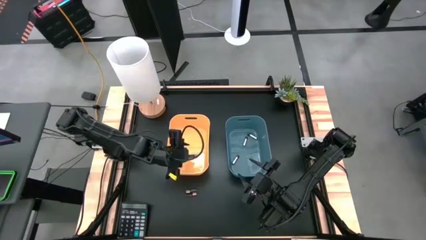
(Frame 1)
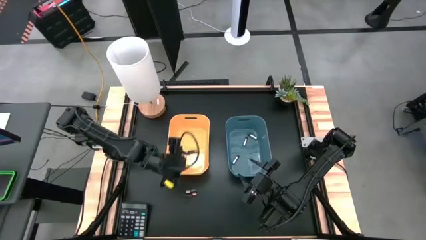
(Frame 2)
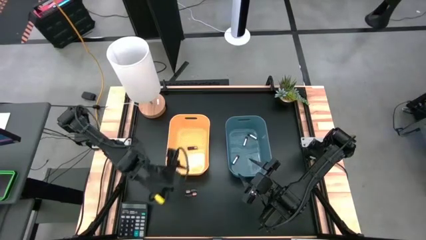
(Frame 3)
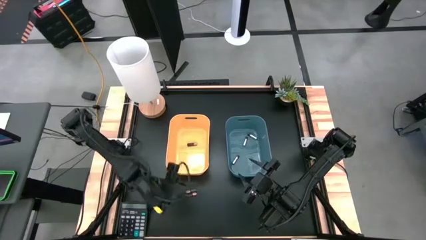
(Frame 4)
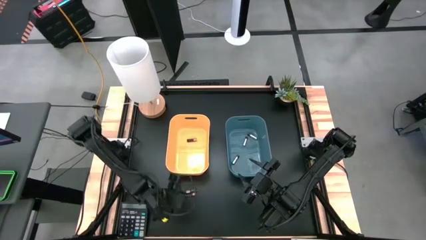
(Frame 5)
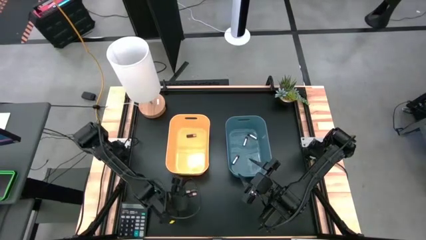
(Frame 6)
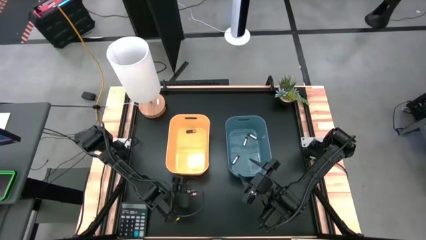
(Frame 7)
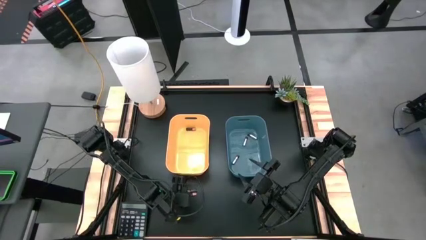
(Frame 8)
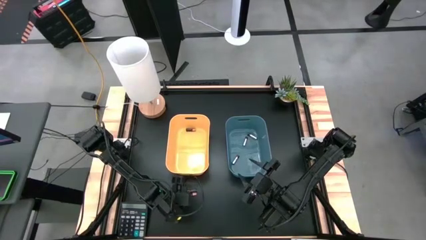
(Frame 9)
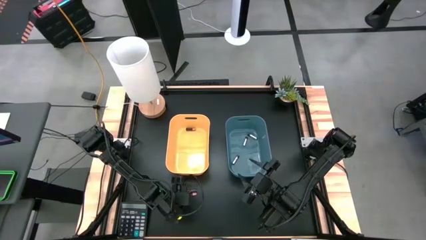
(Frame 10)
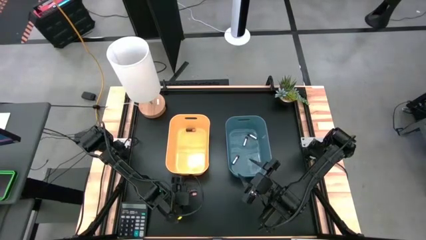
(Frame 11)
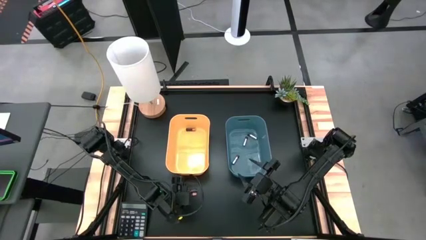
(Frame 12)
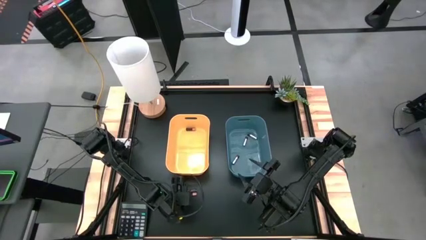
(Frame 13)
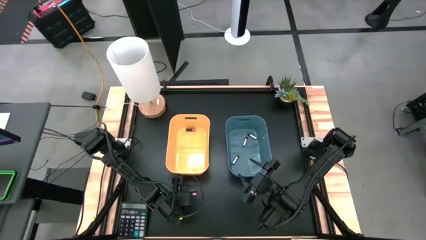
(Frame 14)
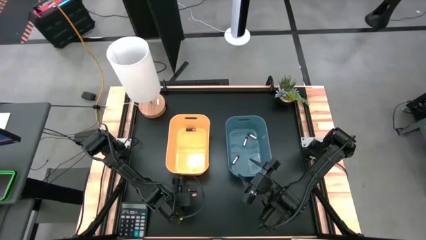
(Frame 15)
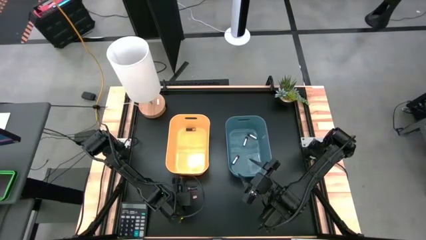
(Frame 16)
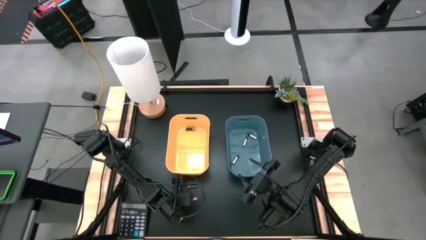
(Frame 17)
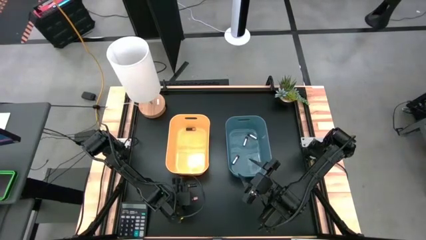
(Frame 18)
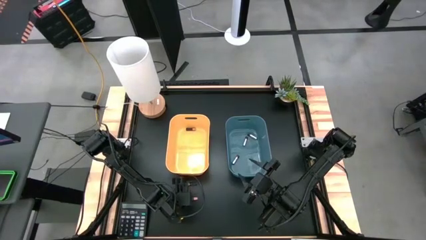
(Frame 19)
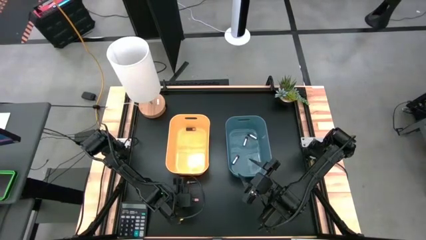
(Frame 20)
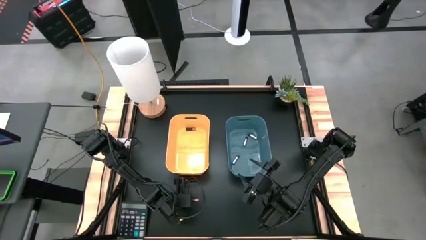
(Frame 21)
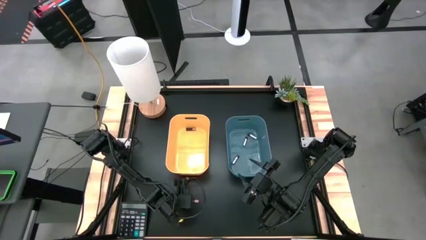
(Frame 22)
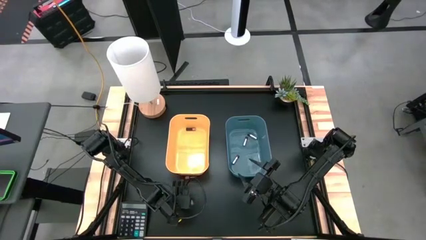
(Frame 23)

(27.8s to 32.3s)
Task: Sort batteries
Put the bottom black battery into the orange bin

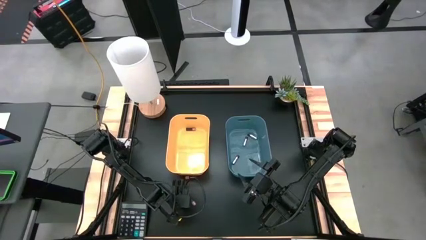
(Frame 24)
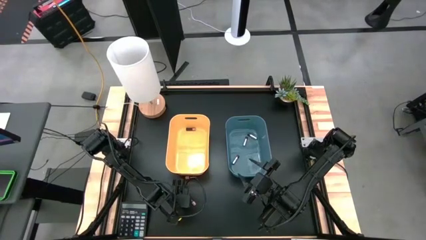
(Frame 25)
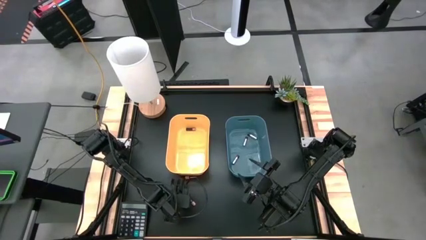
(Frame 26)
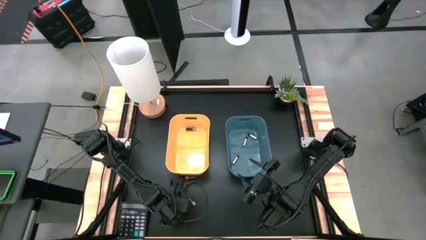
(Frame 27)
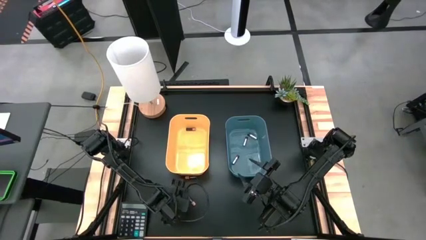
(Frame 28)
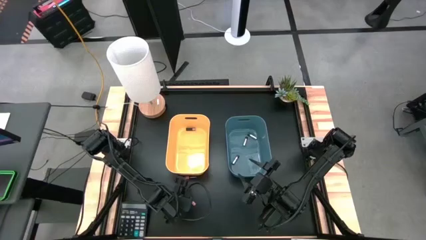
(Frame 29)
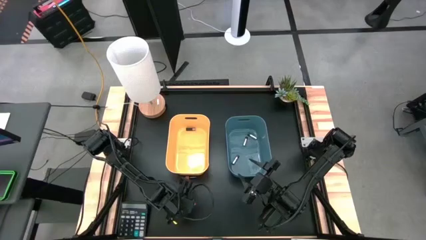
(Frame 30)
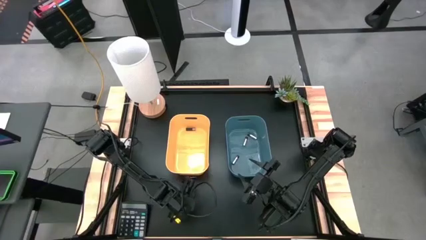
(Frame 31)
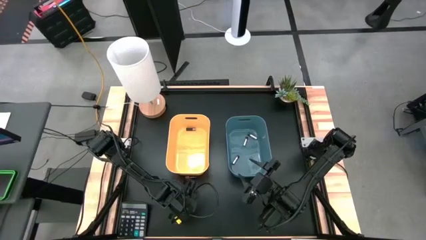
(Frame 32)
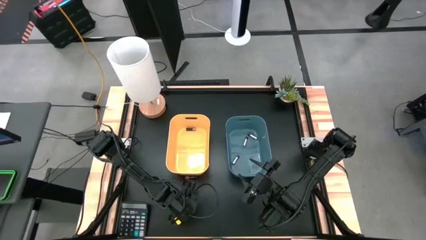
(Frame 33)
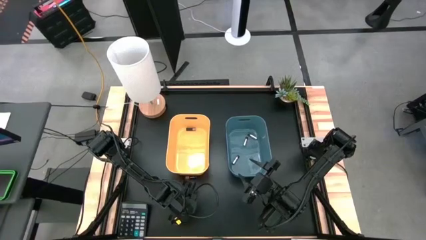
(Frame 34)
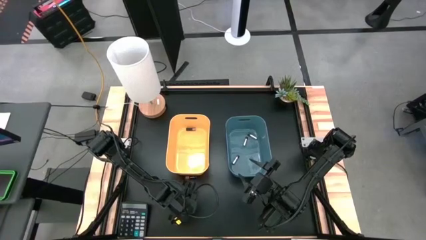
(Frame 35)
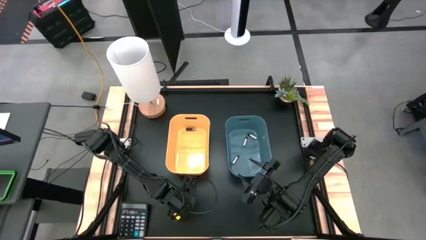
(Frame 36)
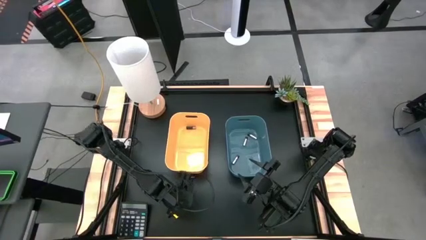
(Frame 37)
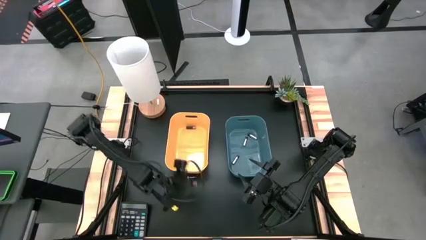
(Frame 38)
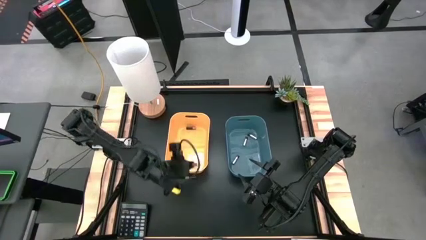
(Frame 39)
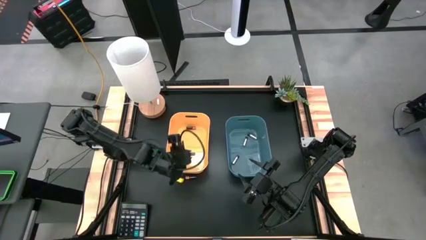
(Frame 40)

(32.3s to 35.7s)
Put the bottom black battery into the orange bin

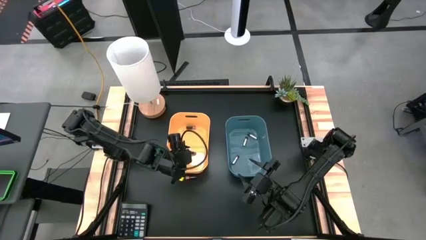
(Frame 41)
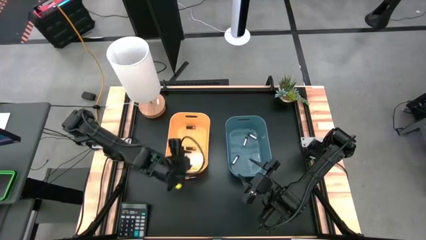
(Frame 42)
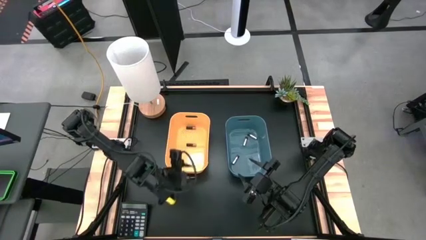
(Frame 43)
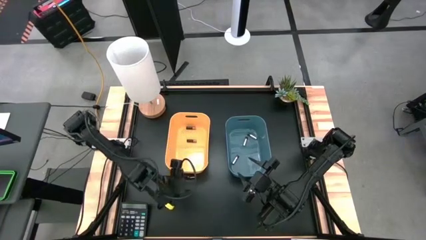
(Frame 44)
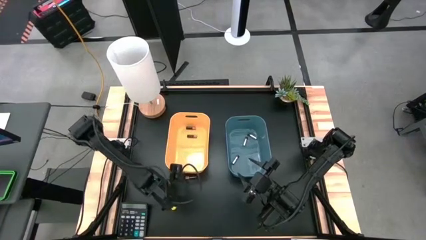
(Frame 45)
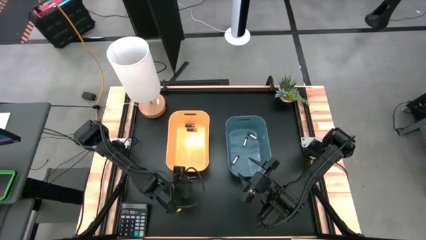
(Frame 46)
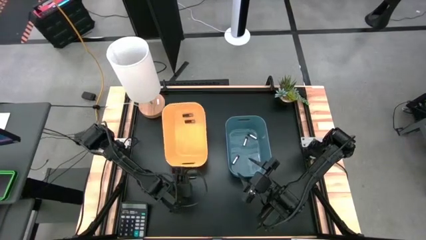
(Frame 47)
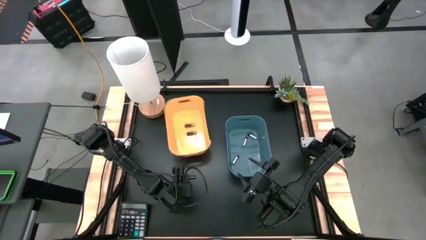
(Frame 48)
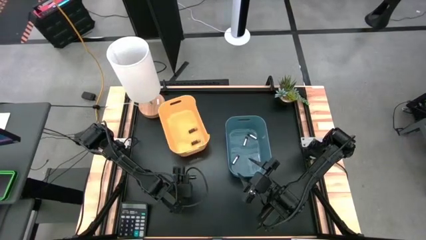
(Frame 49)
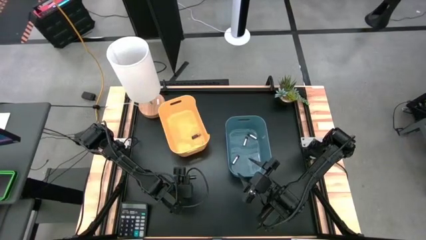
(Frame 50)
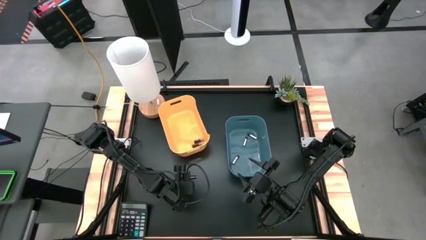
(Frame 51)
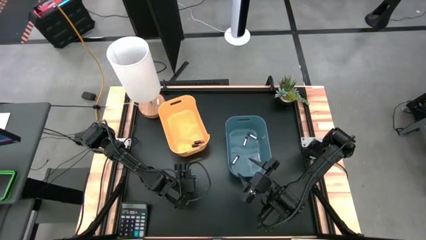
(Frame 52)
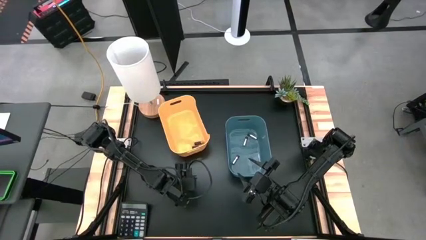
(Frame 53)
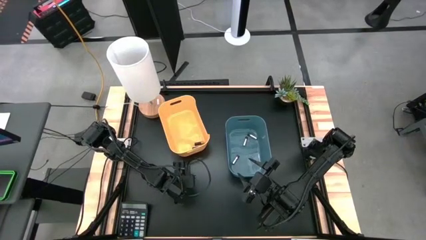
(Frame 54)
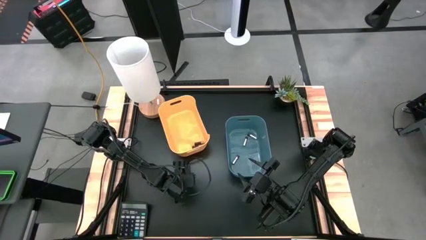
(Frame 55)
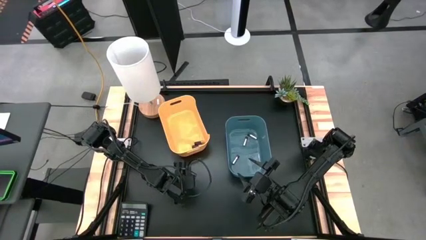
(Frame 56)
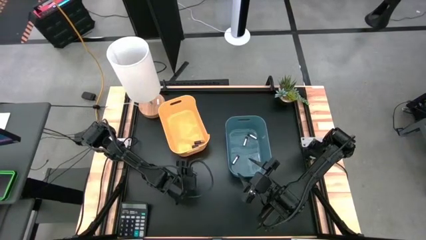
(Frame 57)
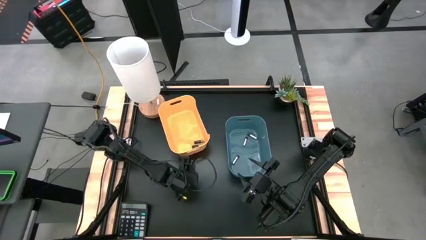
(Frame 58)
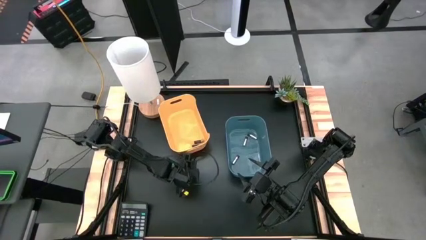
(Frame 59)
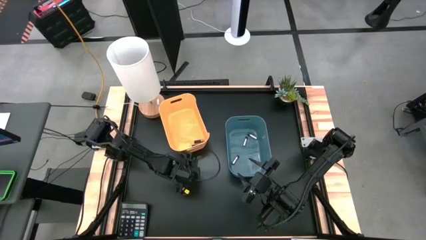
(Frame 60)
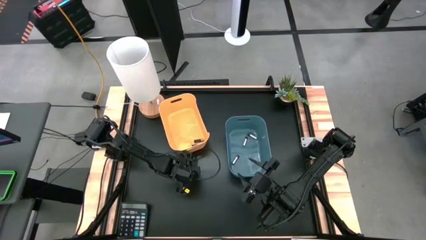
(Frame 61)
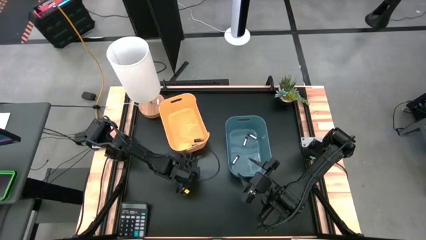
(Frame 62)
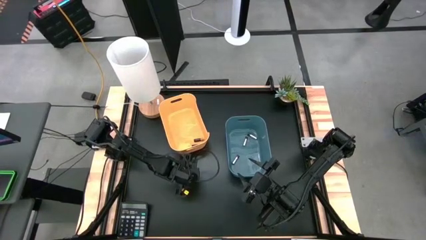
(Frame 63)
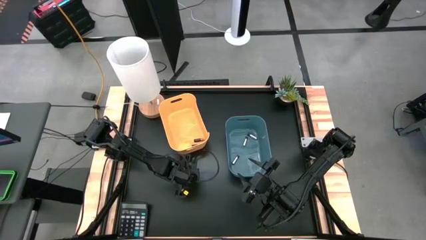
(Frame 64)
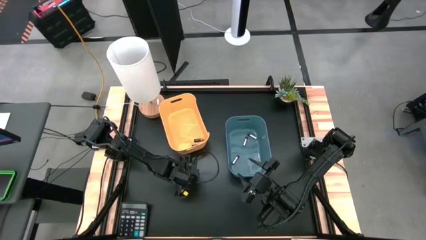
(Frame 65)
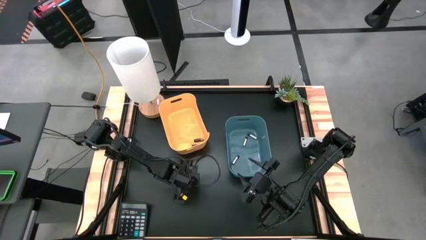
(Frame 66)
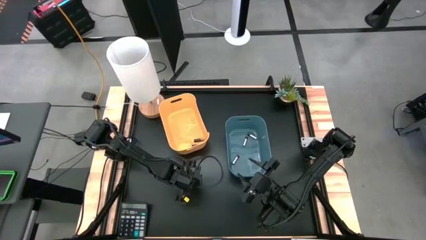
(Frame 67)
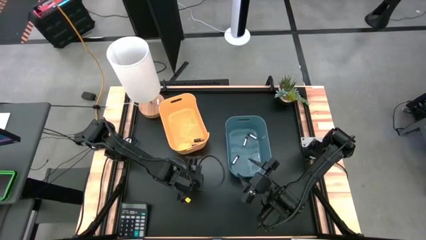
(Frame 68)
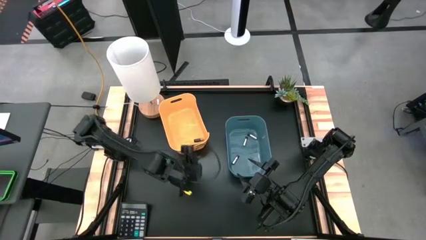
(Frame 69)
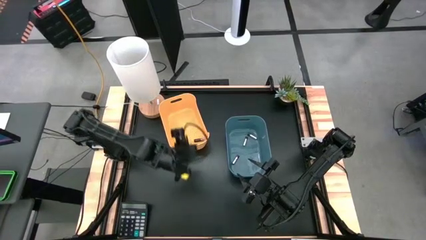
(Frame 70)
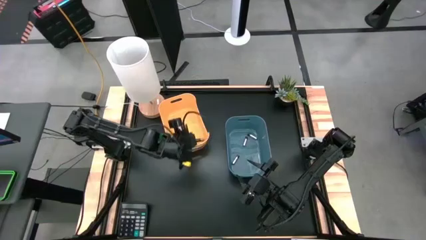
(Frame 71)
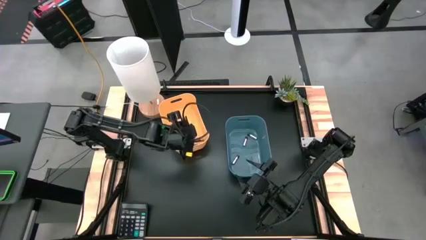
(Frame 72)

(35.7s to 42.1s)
Put the black battery into the orange bin

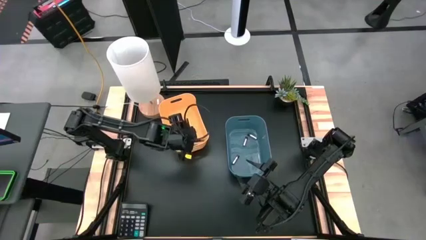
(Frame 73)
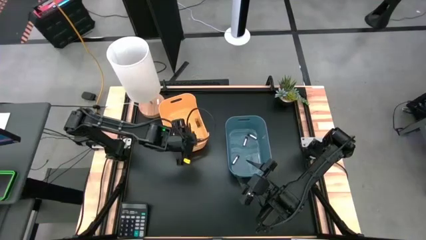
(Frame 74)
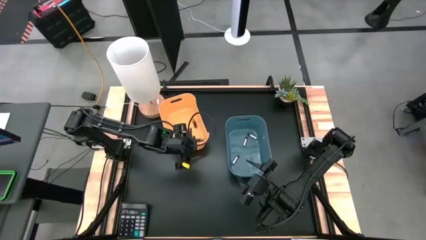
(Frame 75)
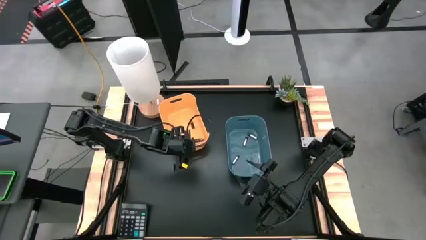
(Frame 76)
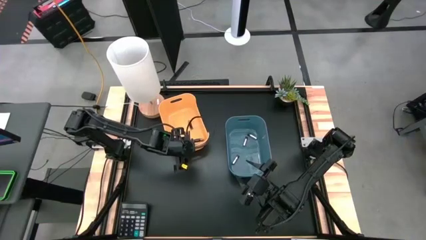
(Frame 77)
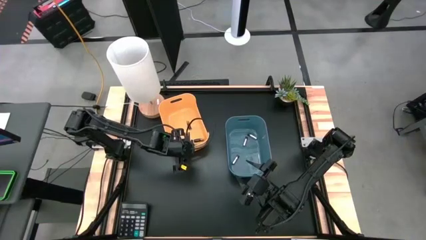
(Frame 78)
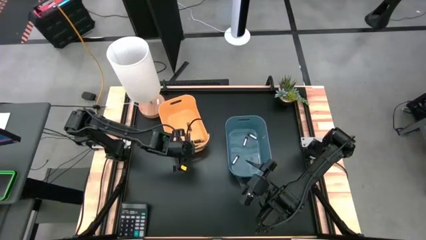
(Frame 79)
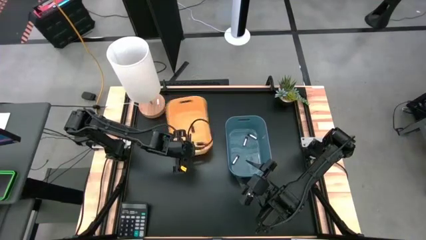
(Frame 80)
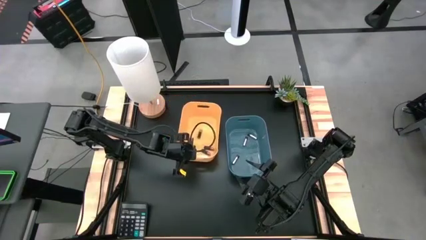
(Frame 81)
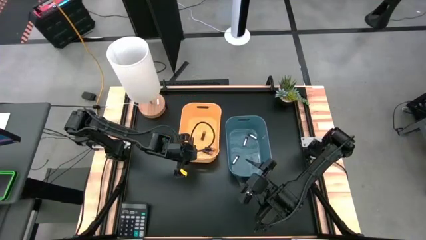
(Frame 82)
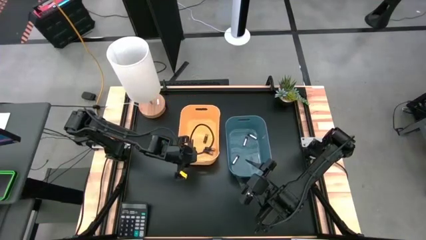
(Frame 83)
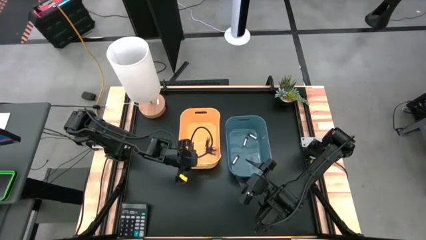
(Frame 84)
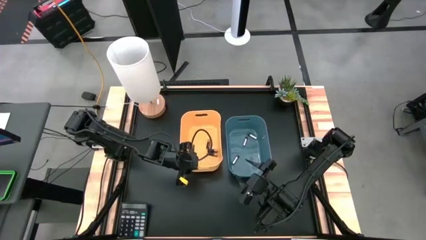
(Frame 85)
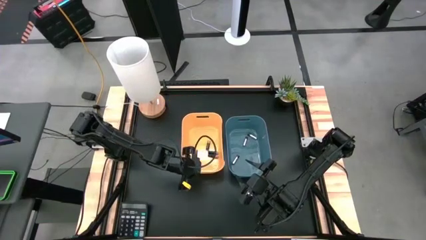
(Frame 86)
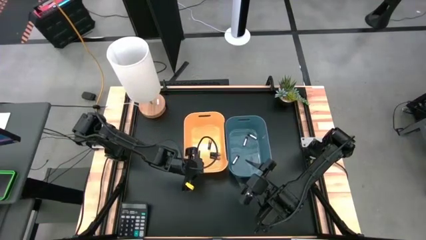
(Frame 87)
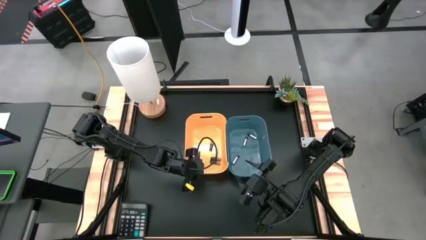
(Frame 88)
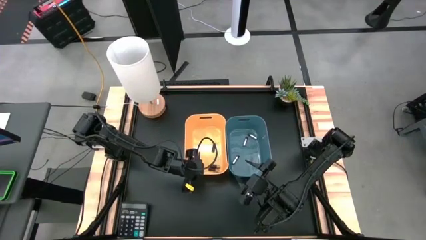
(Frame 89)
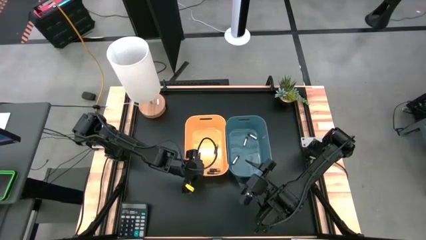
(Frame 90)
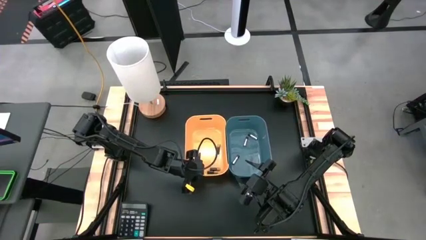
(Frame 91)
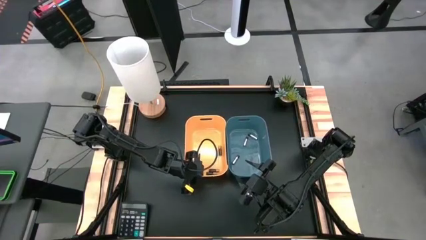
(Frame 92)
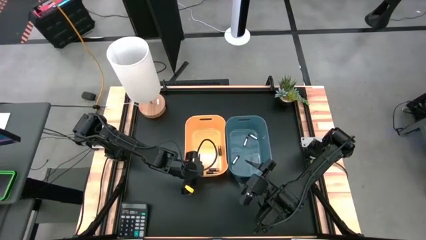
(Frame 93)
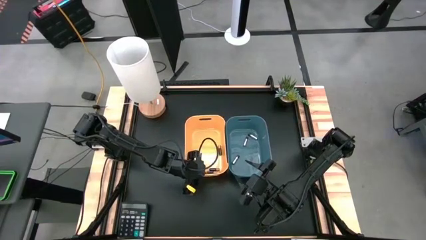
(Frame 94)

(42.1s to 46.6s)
Adjust the orange bin
